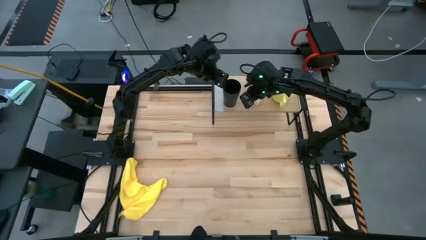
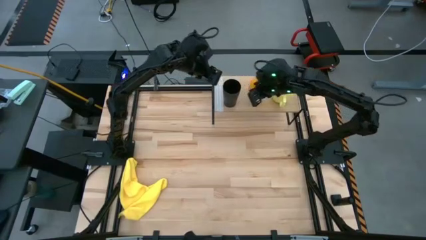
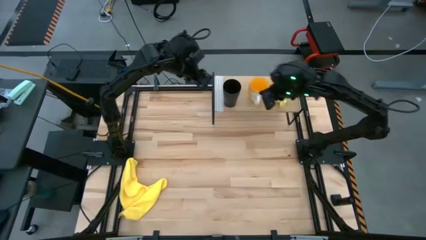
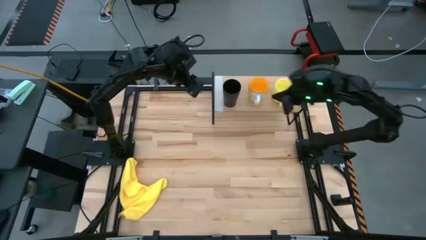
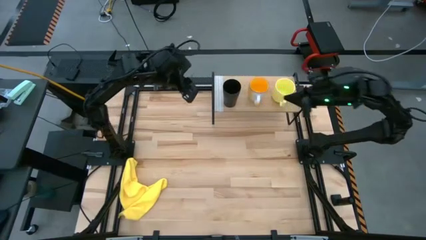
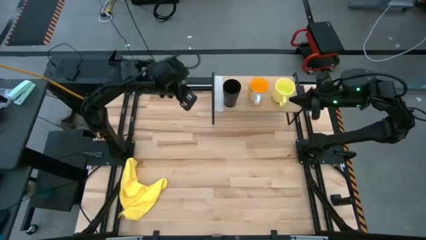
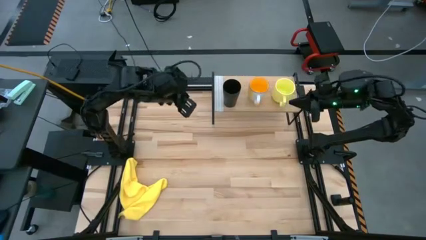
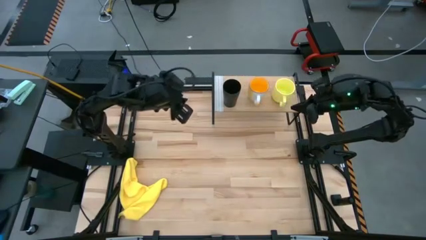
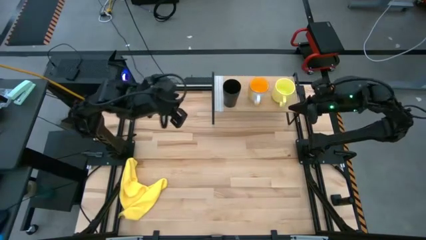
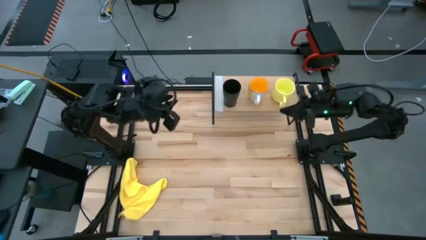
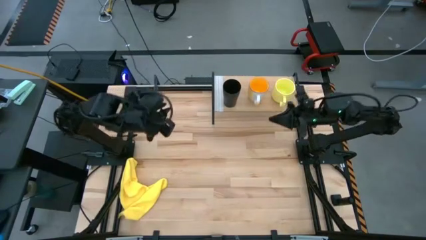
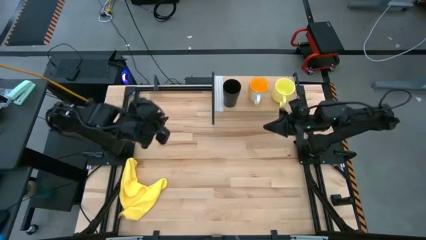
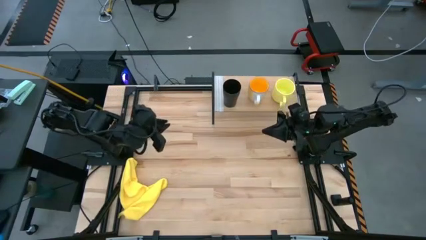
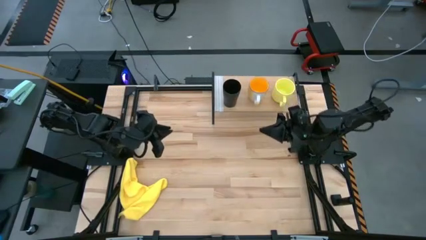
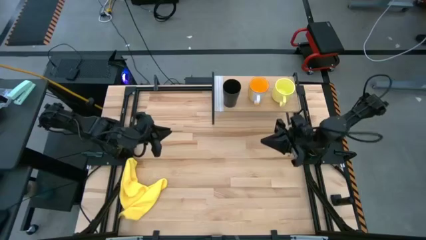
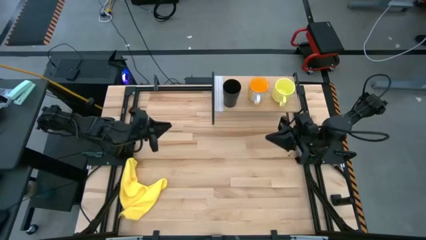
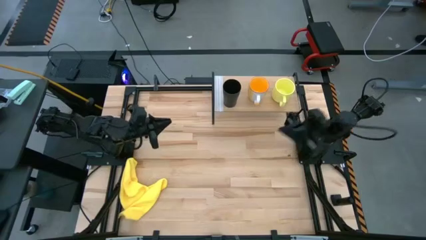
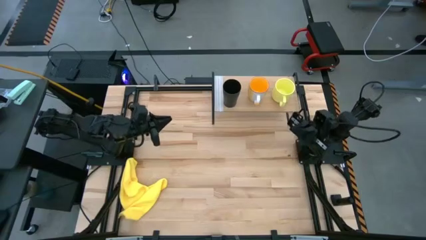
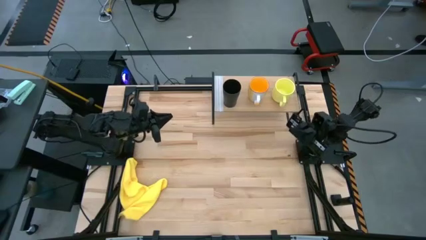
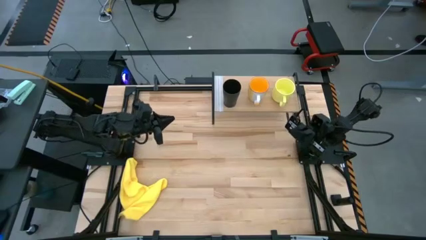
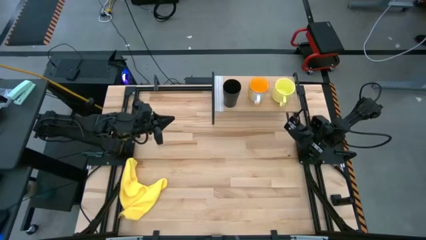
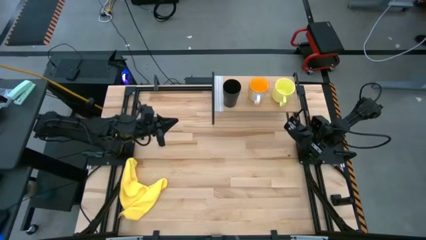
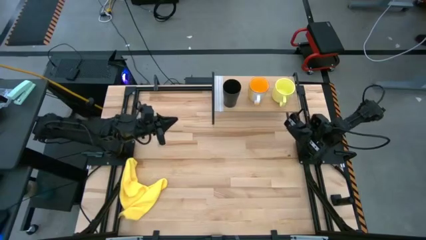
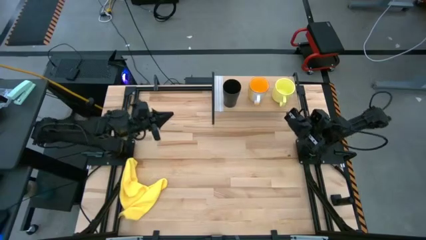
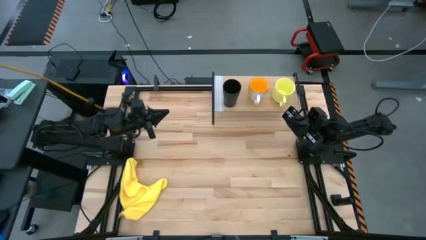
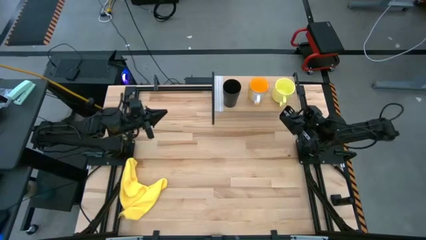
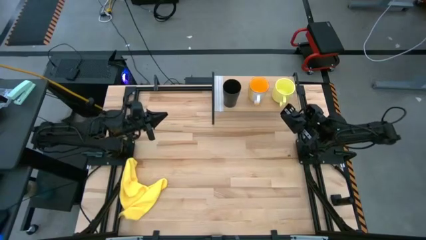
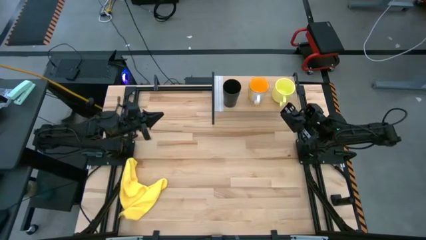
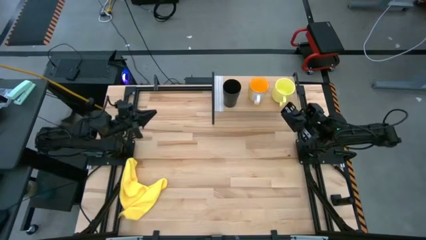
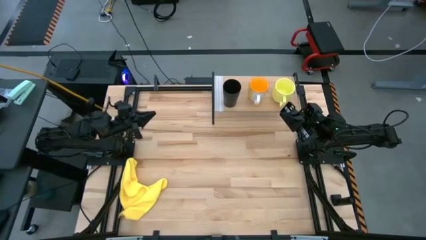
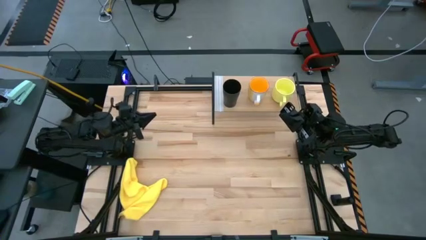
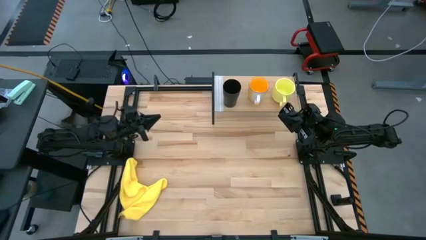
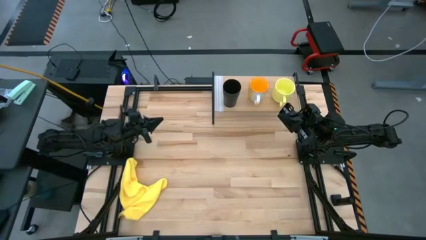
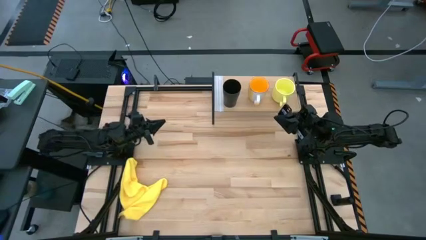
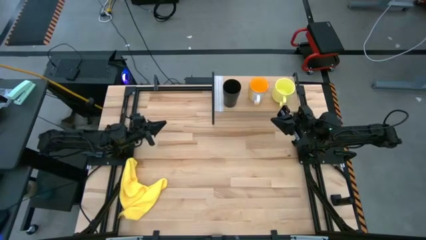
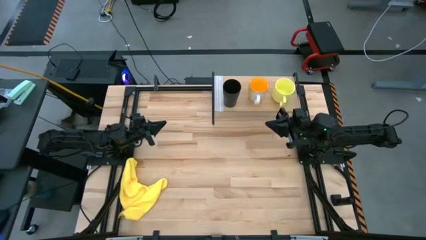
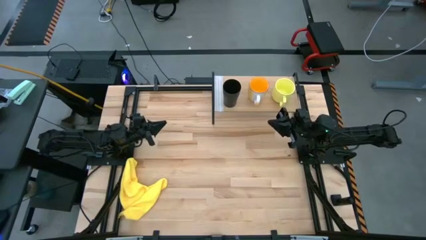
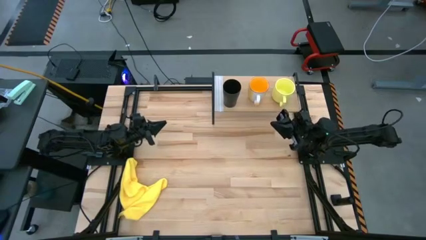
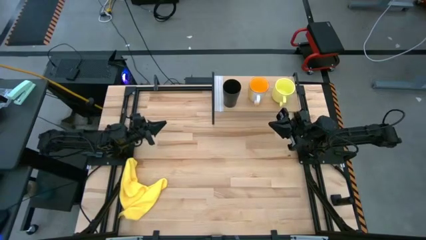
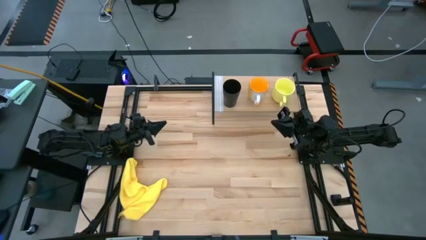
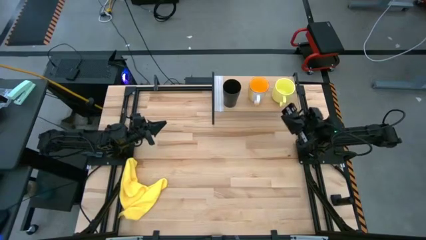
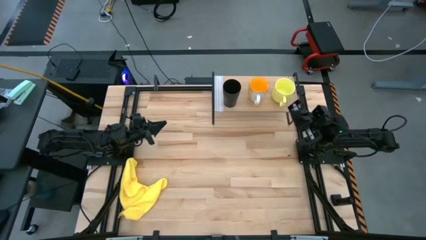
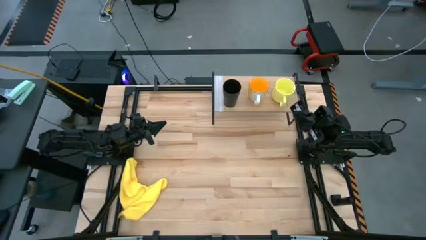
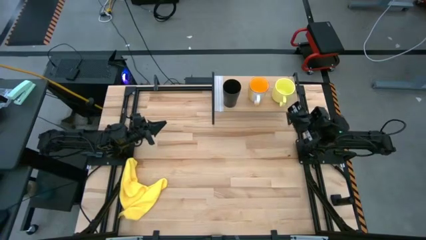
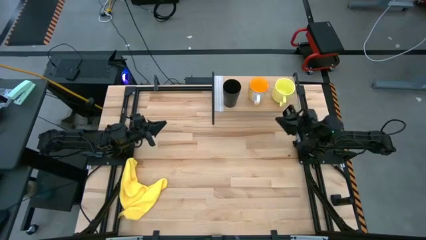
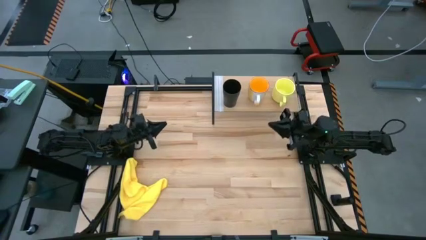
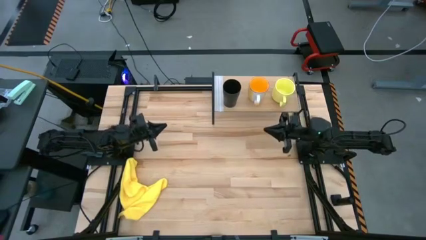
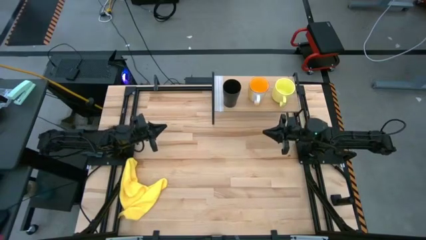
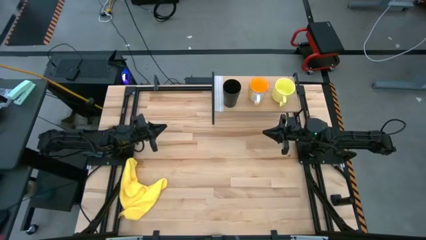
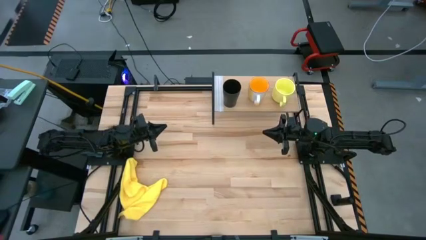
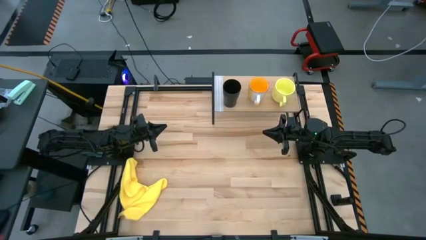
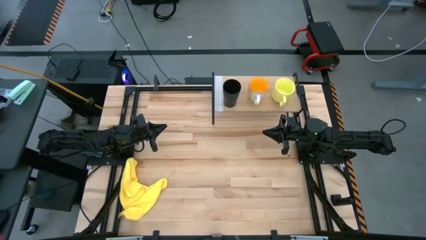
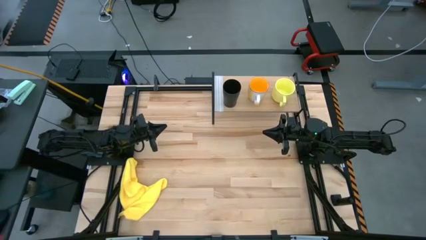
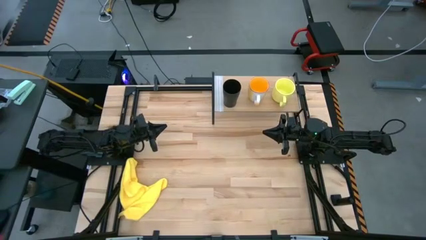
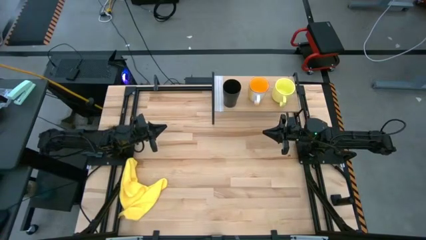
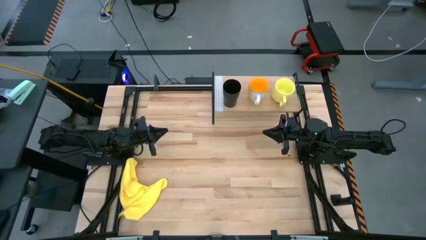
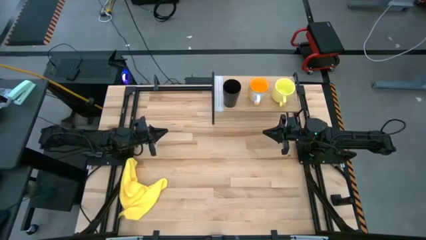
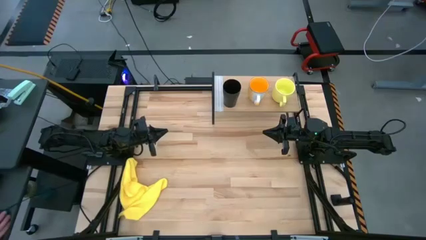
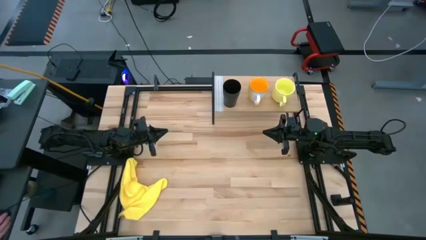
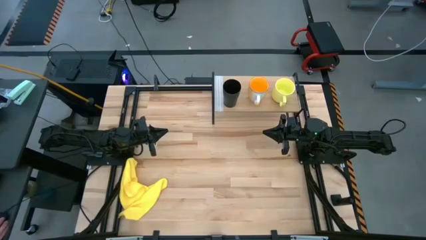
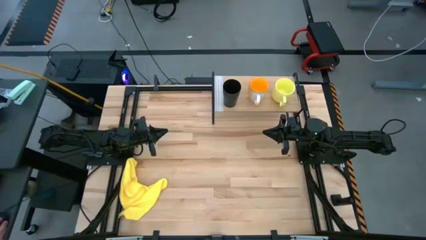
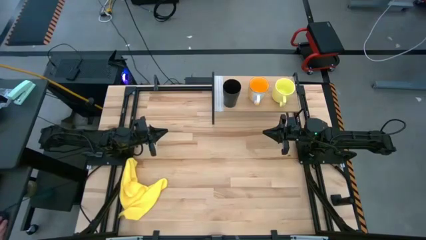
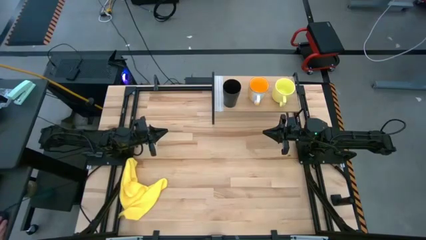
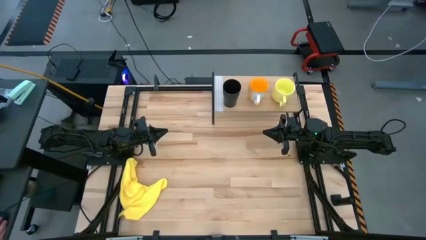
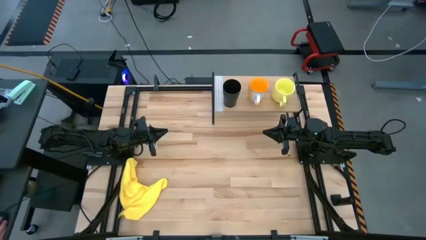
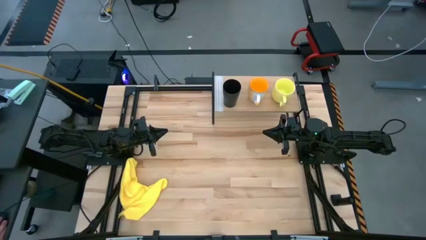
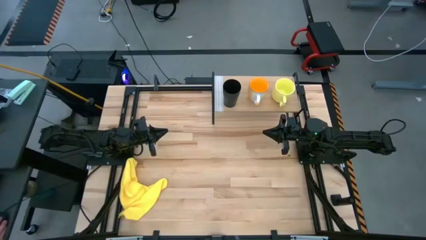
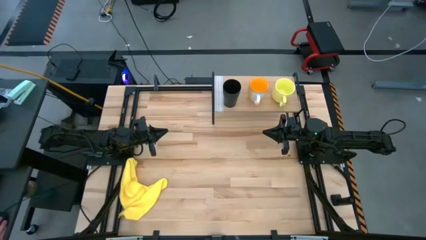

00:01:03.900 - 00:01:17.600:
Task: Stack small to large cups/mugs on shelf
Return to Home Position
